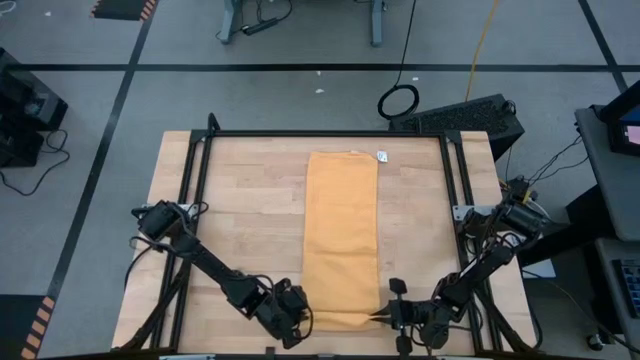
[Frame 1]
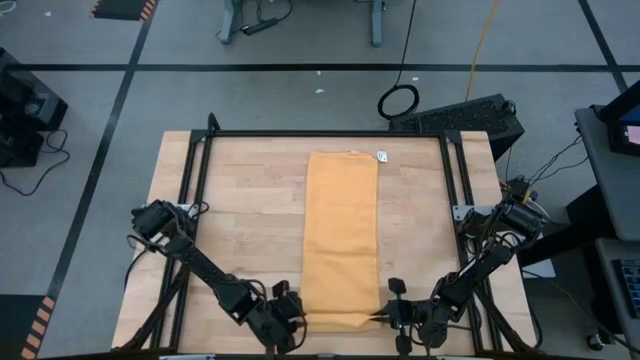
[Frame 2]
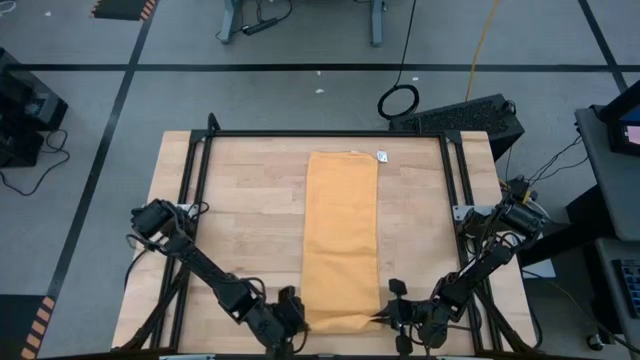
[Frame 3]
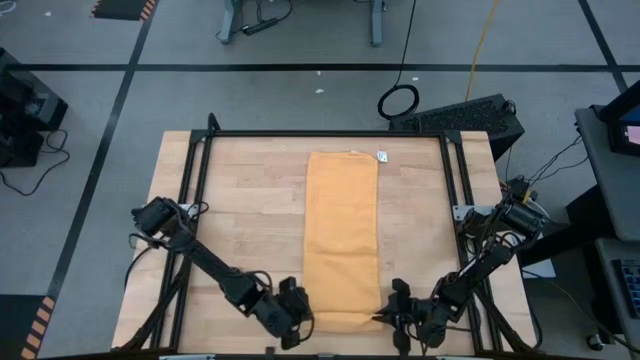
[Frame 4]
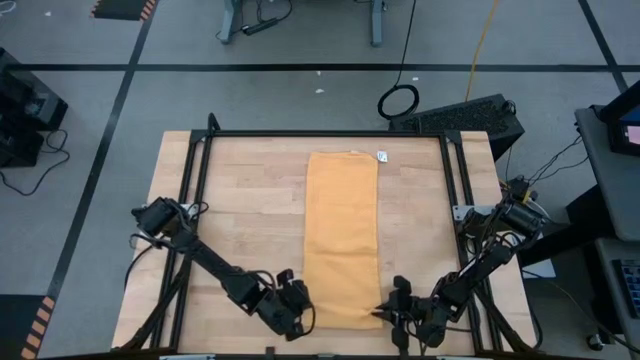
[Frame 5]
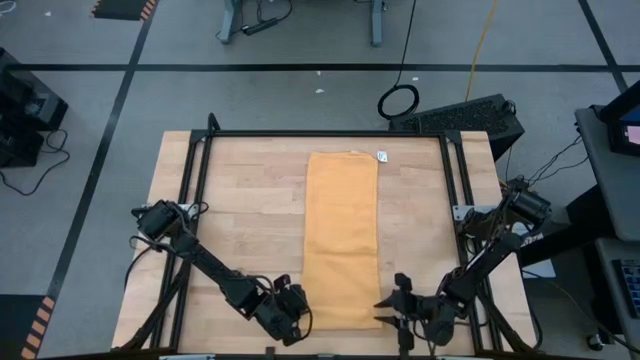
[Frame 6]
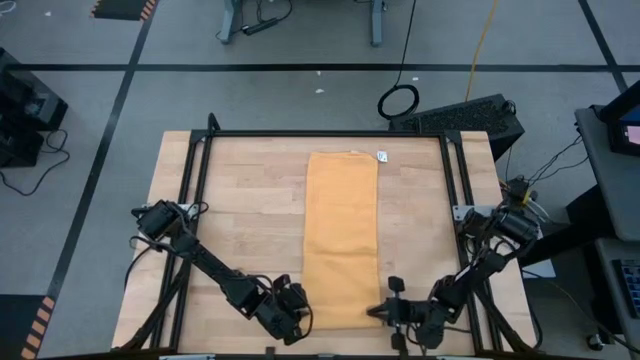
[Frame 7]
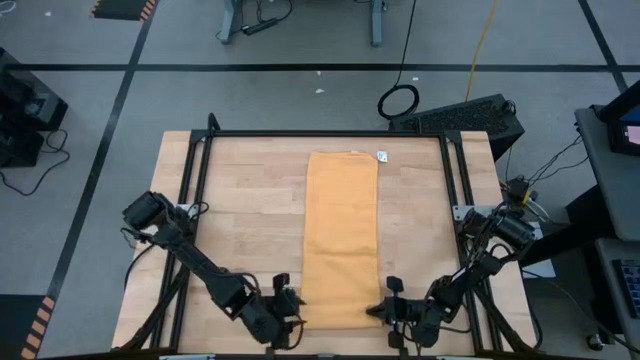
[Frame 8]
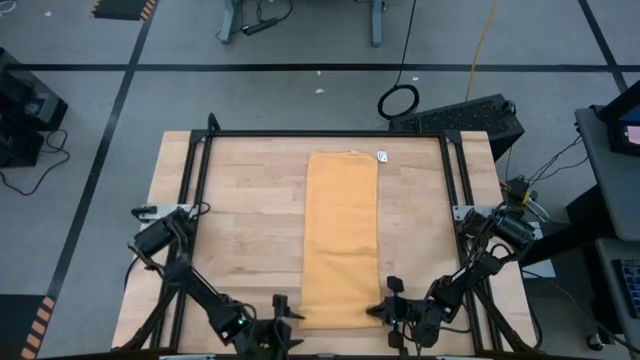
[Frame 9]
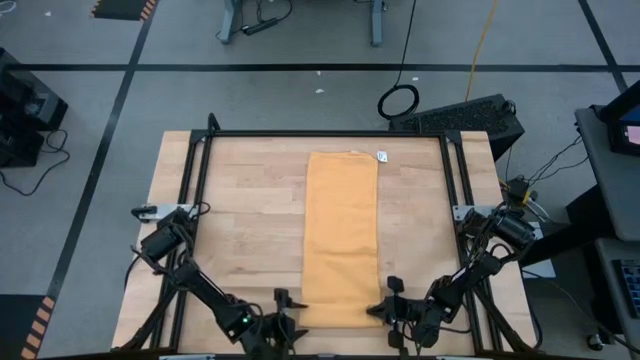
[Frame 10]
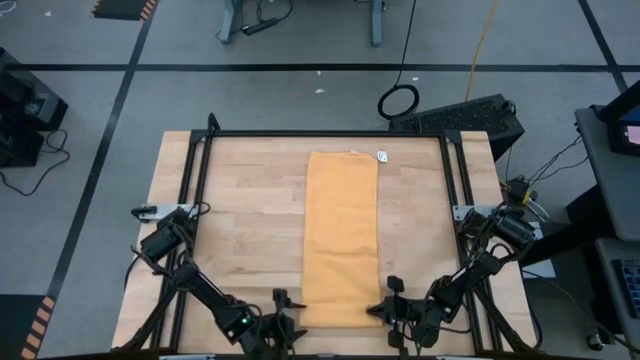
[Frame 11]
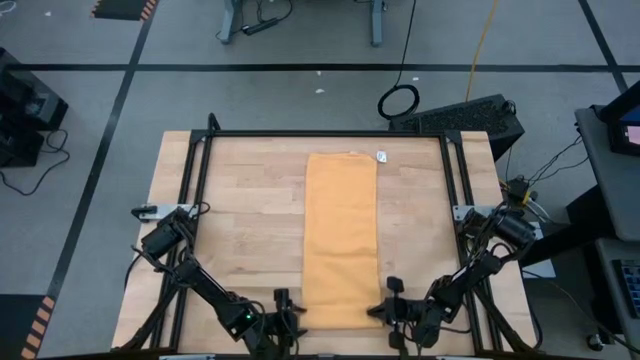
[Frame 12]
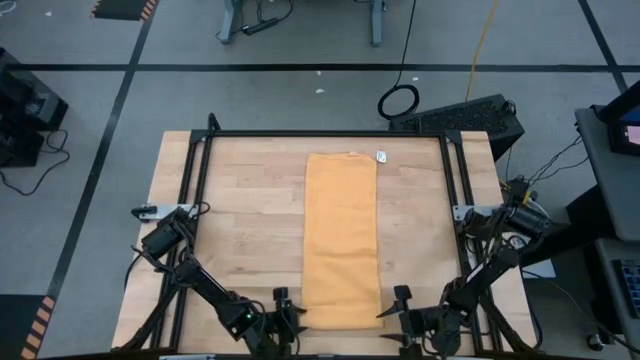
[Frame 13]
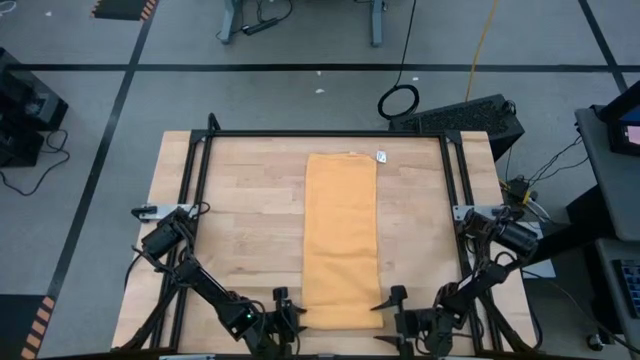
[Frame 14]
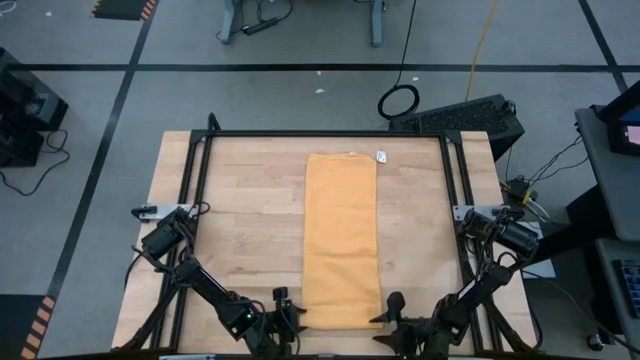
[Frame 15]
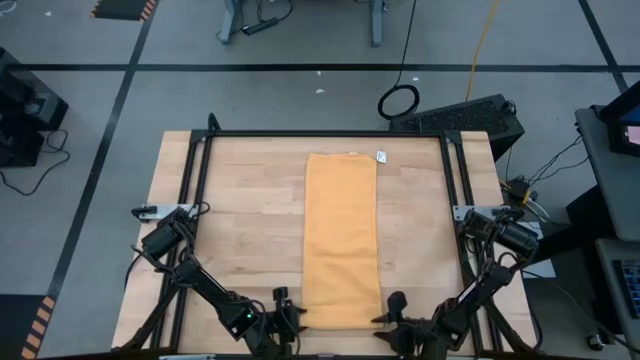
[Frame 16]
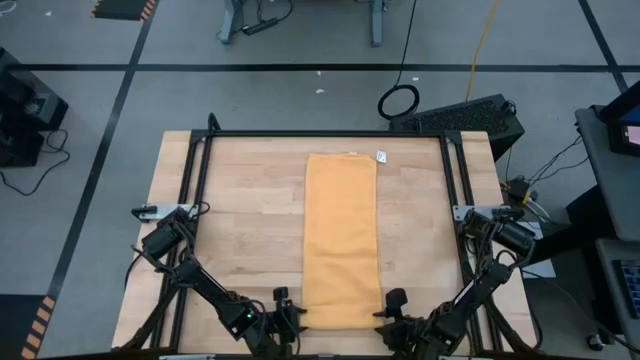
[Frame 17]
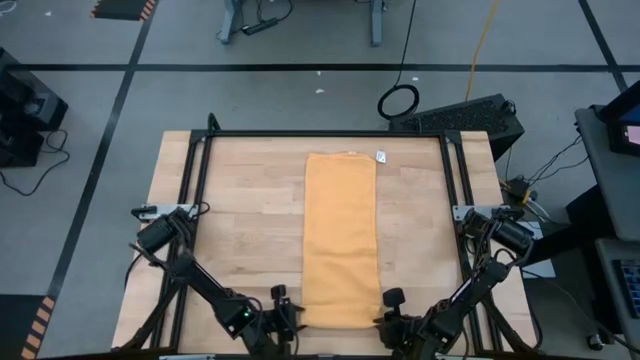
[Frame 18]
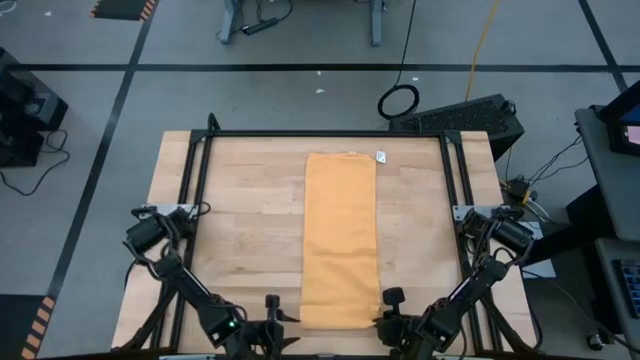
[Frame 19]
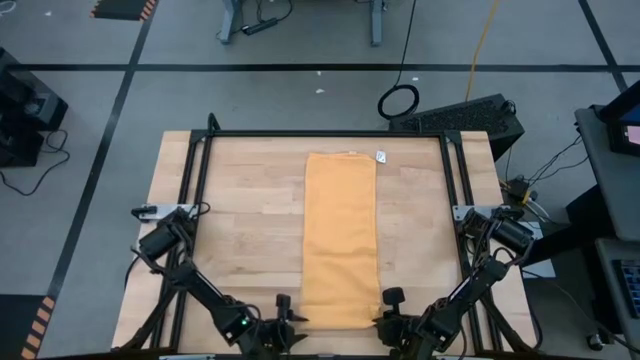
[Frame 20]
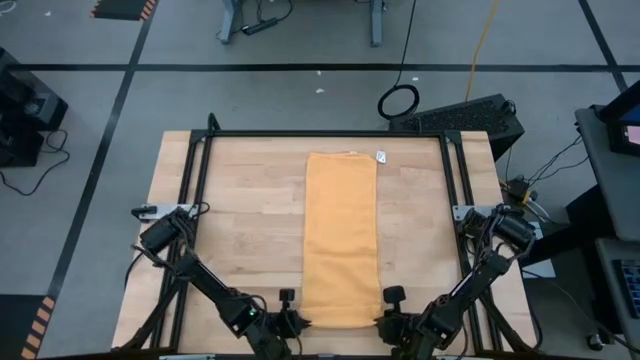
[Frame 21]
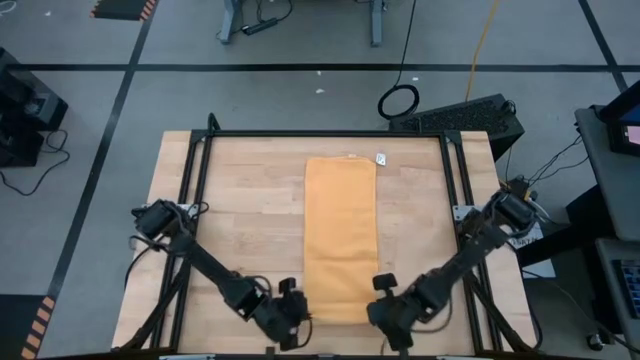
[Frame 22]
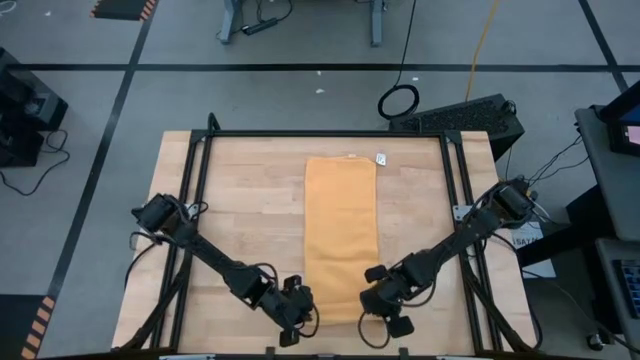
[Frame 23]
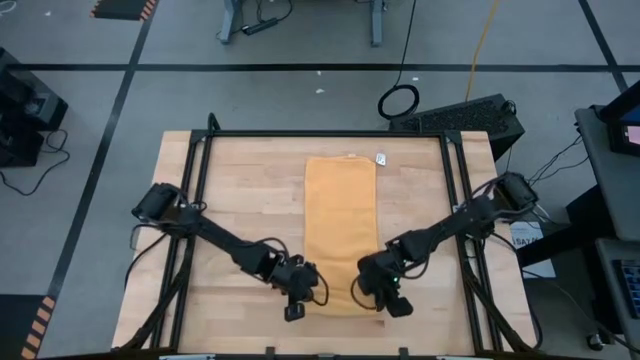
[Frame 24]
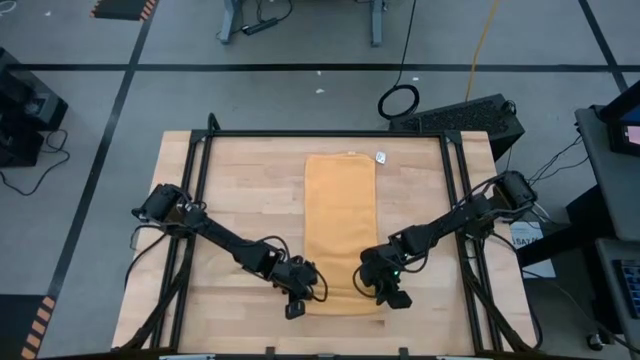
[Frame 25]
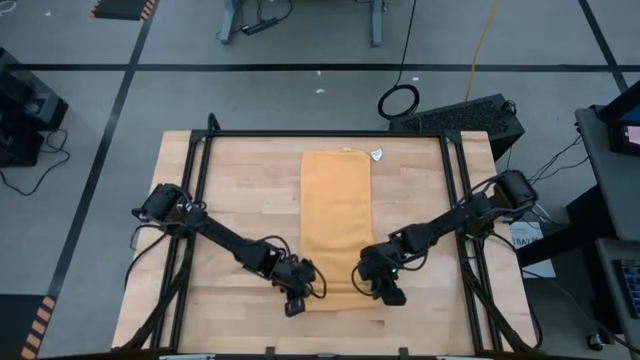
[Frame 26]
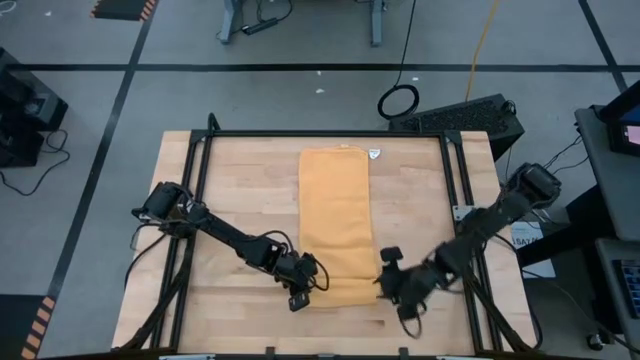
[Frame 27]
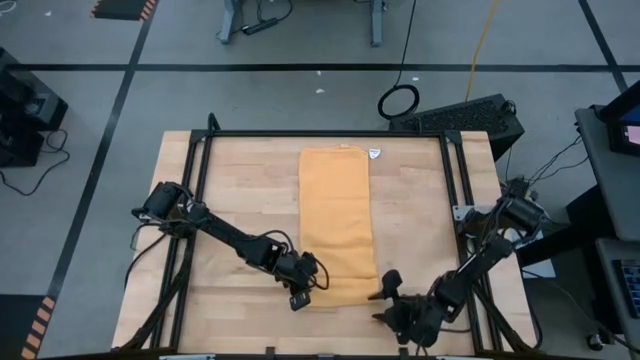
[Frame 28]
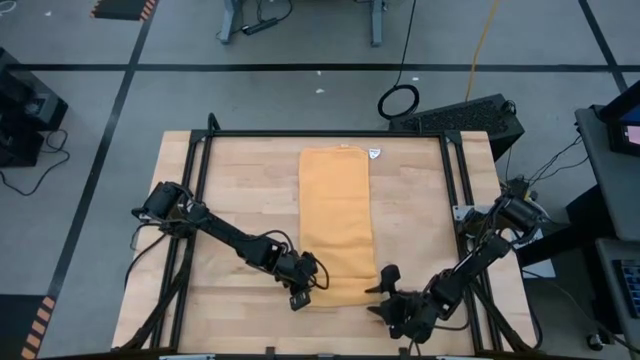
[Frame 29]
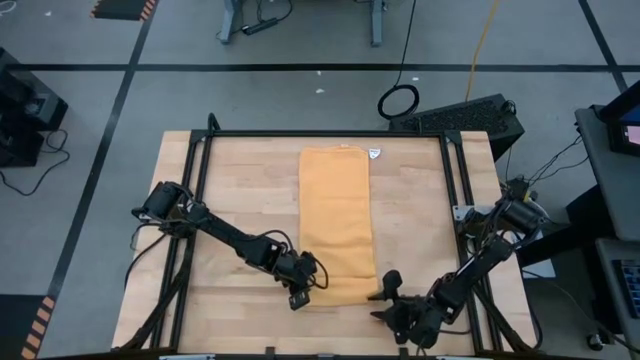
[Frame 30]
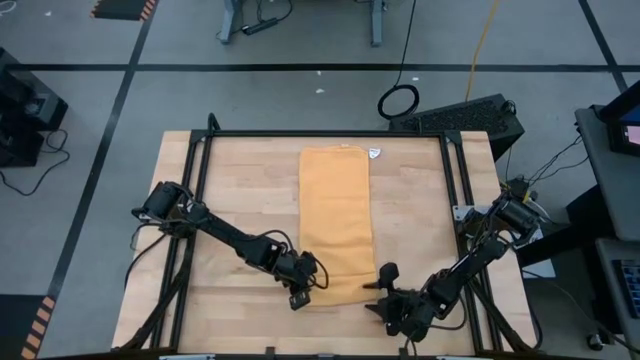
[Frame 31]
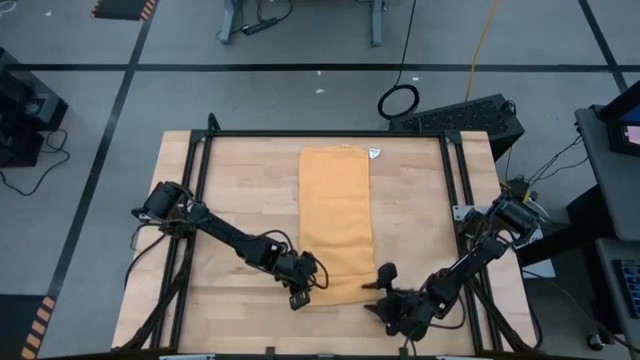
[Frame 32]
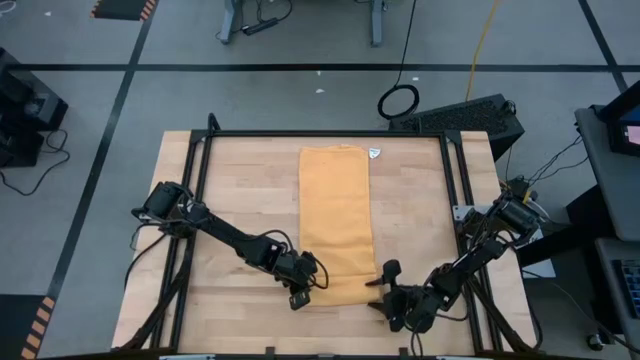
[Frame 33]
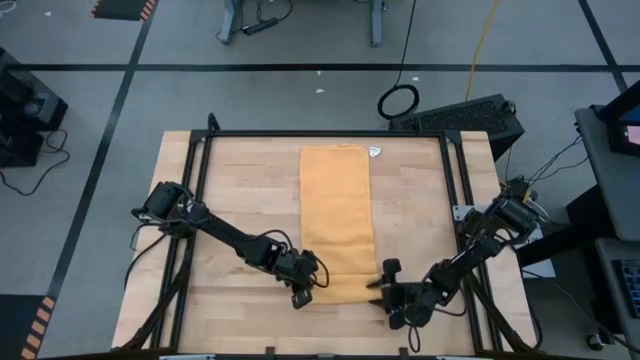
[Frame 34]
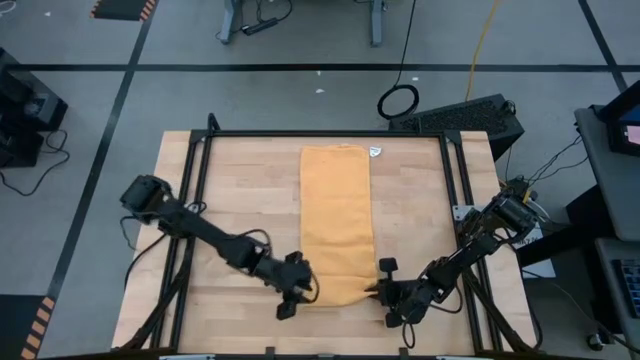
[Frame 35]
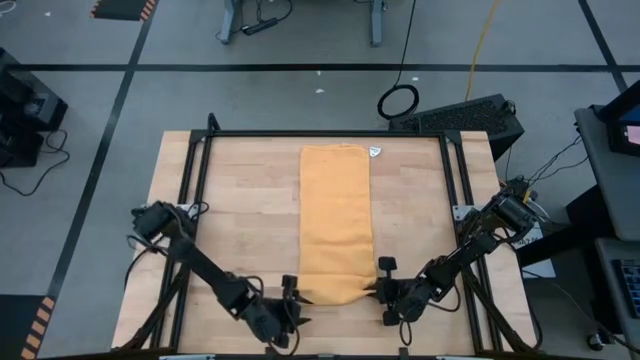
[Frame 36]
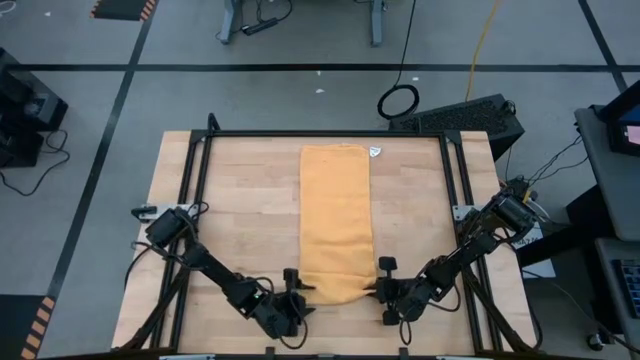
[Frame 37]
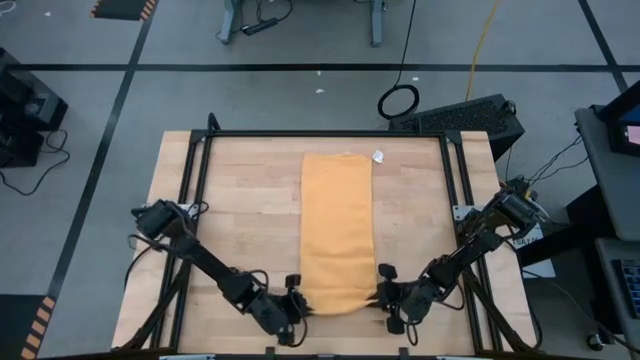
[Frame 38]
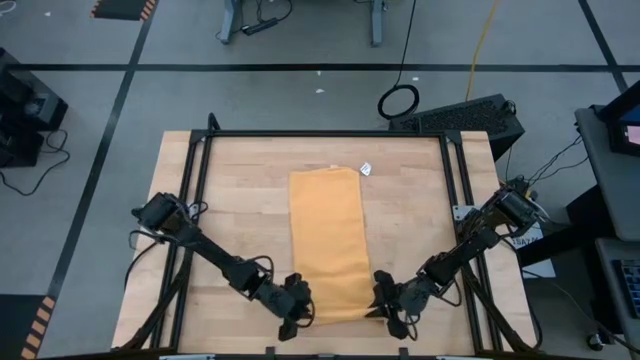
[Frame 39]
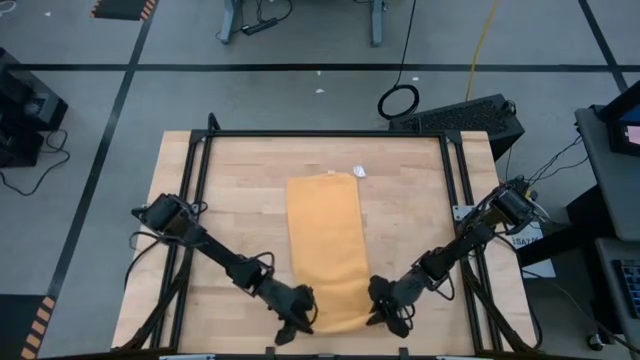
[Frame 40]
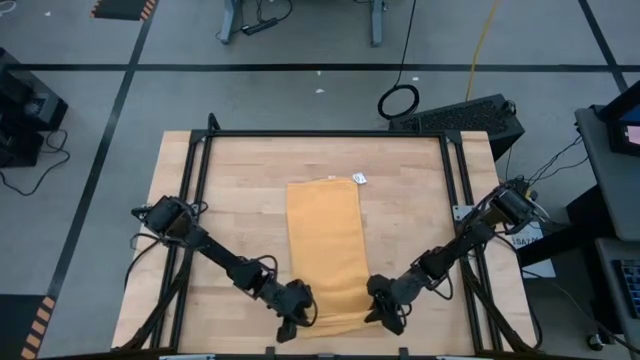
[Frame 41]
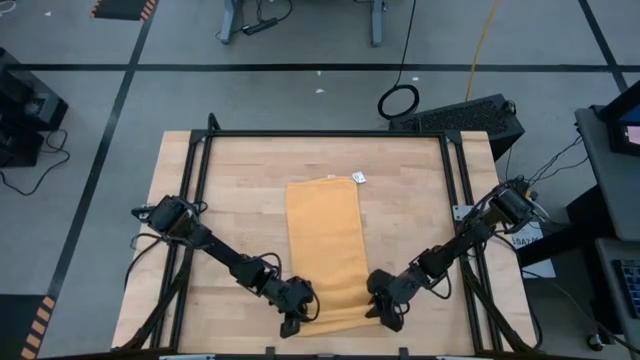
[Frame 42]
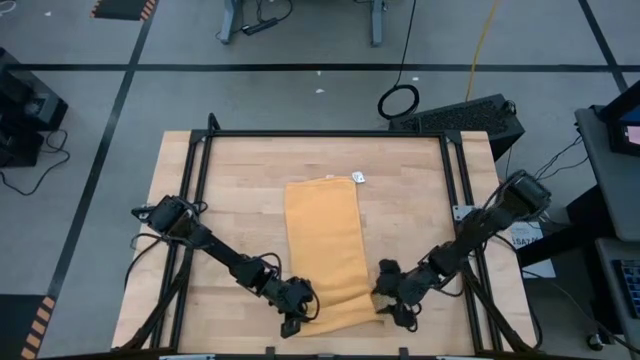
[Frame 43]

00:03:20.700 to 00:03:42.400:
Task: Roll towel
Roll the yellow towel
